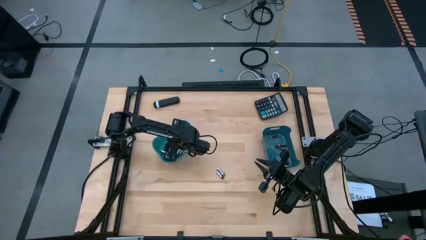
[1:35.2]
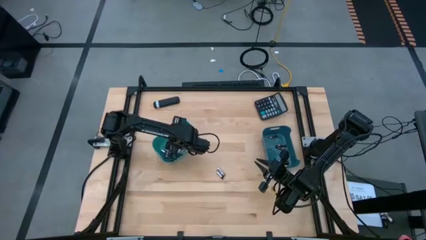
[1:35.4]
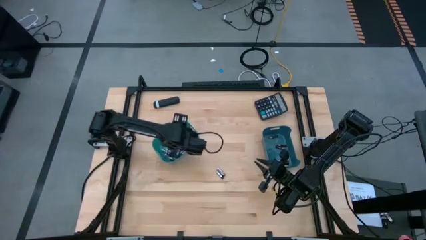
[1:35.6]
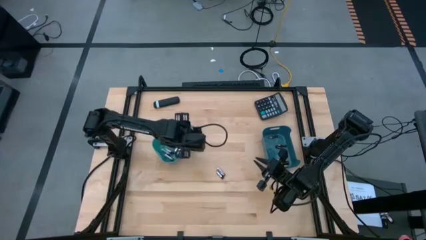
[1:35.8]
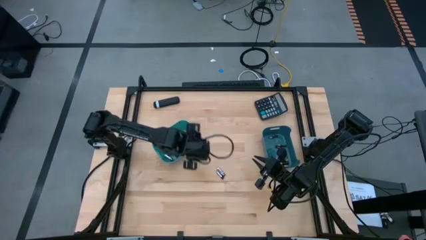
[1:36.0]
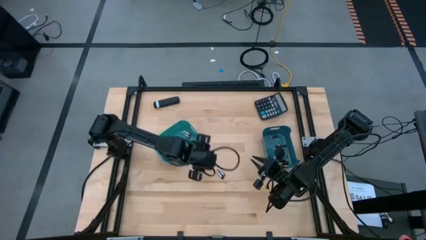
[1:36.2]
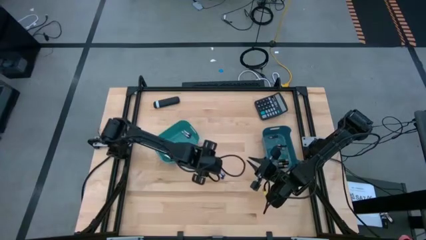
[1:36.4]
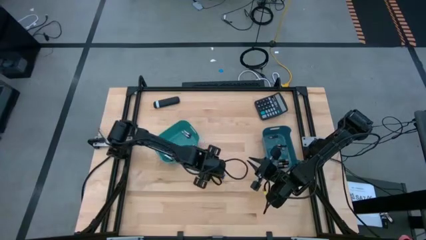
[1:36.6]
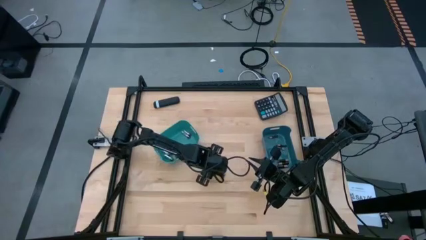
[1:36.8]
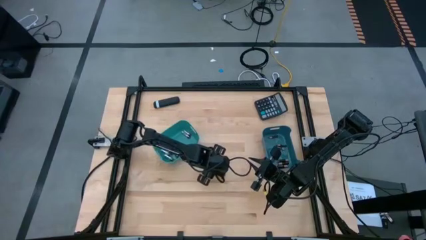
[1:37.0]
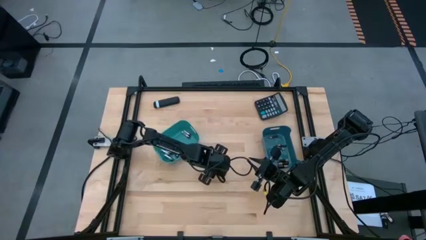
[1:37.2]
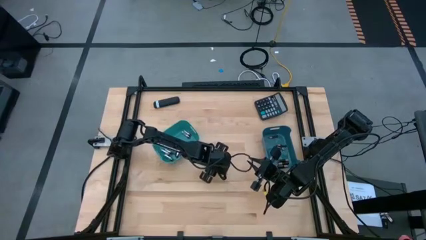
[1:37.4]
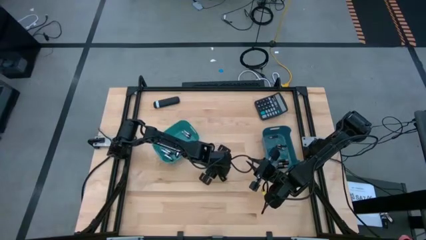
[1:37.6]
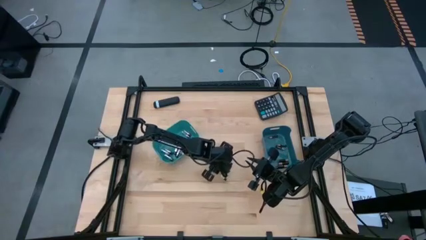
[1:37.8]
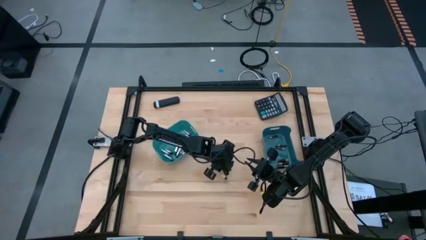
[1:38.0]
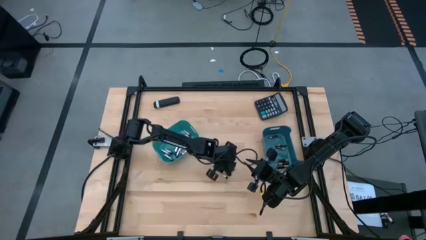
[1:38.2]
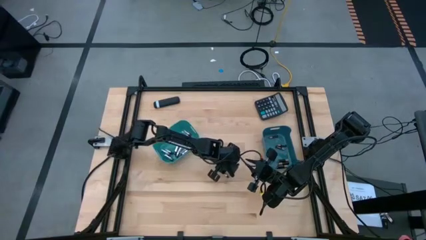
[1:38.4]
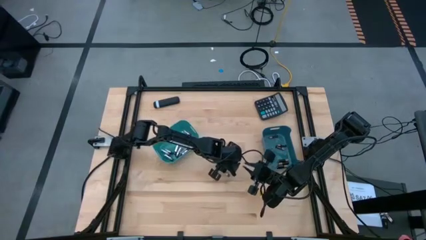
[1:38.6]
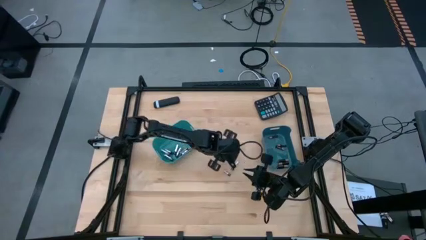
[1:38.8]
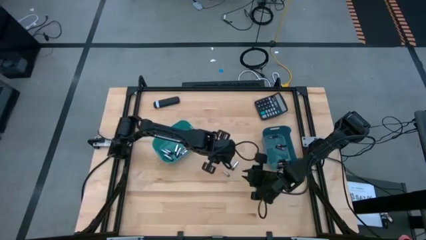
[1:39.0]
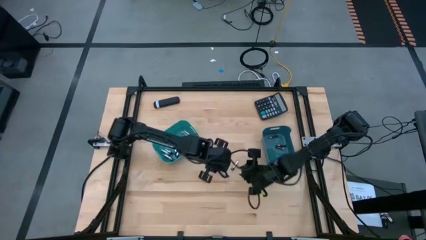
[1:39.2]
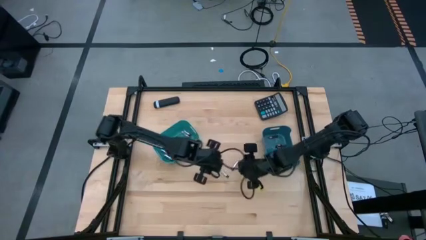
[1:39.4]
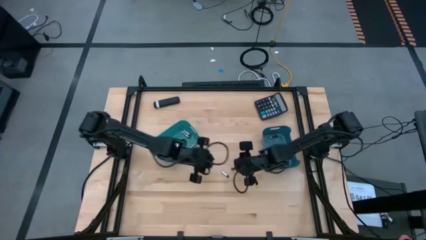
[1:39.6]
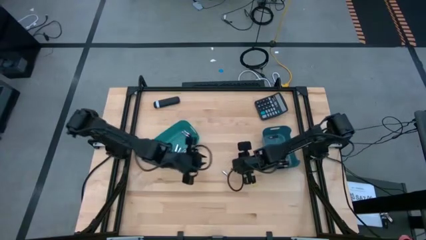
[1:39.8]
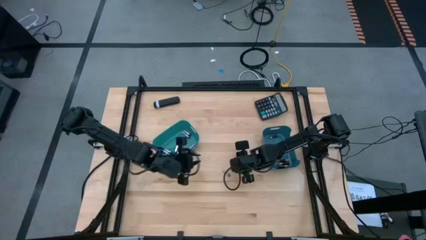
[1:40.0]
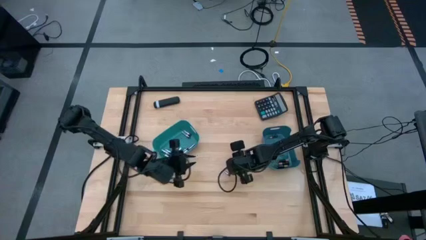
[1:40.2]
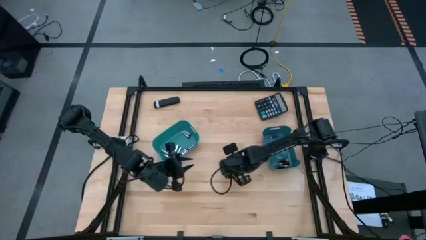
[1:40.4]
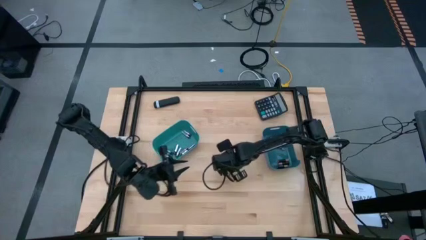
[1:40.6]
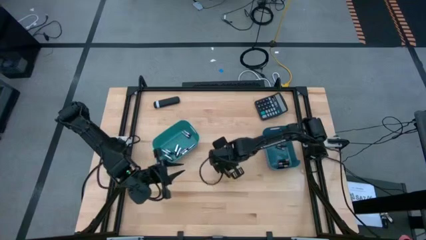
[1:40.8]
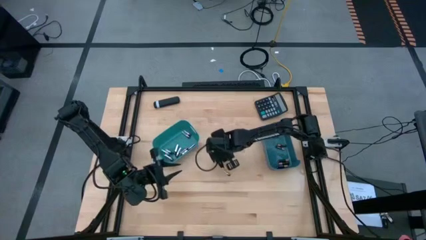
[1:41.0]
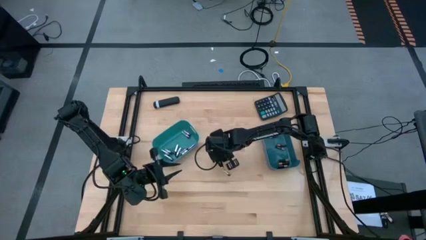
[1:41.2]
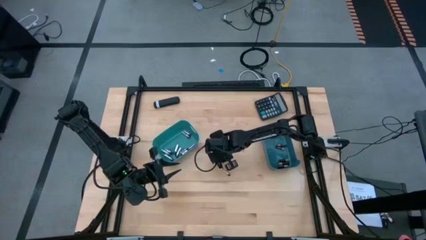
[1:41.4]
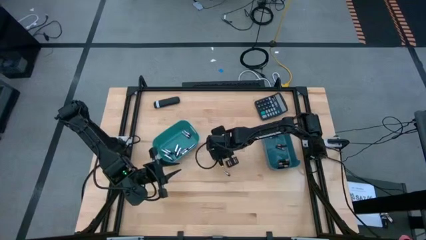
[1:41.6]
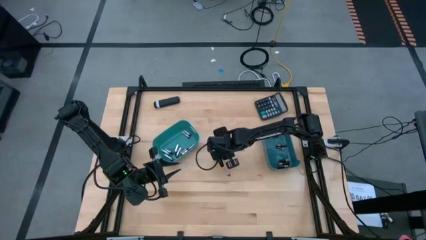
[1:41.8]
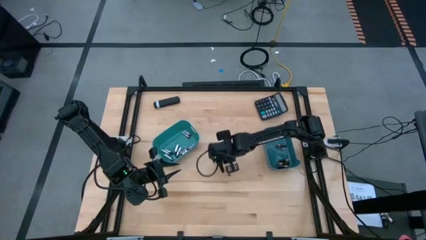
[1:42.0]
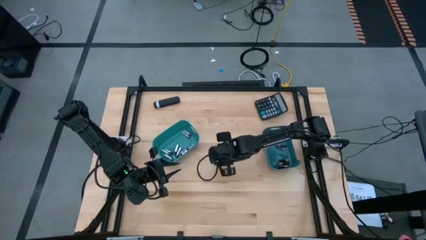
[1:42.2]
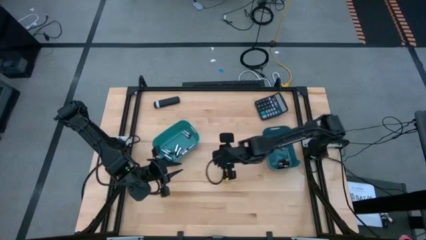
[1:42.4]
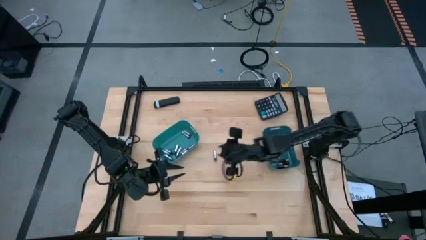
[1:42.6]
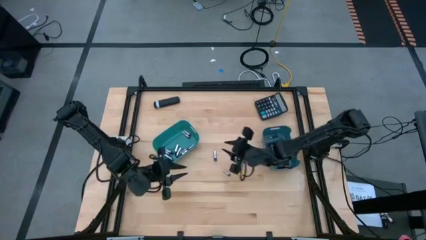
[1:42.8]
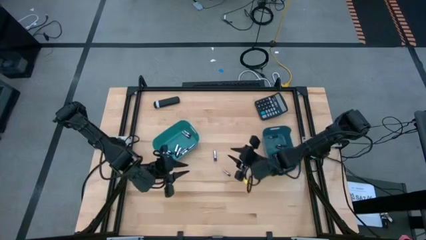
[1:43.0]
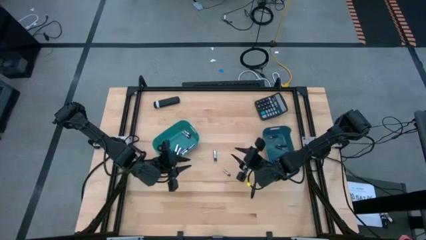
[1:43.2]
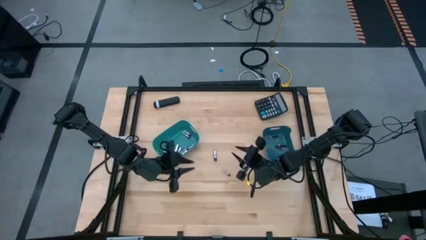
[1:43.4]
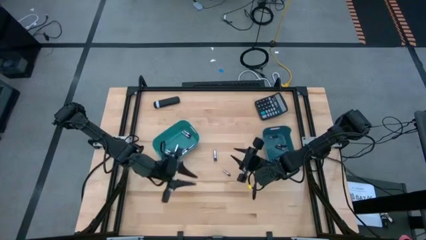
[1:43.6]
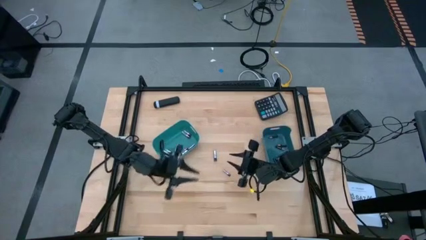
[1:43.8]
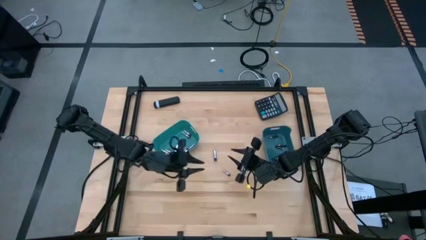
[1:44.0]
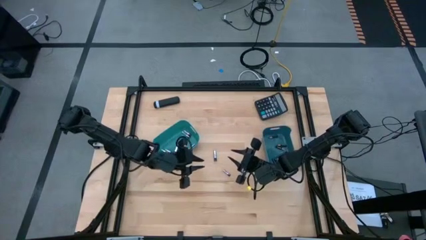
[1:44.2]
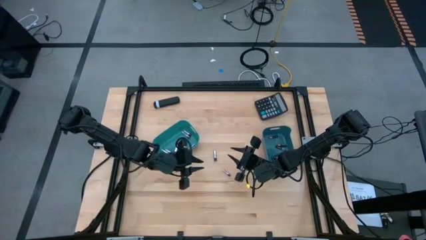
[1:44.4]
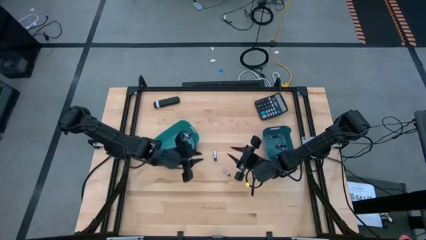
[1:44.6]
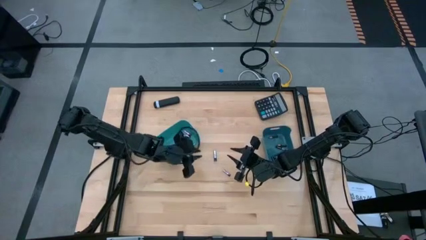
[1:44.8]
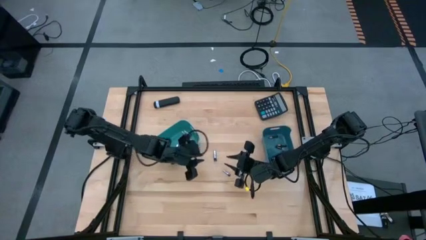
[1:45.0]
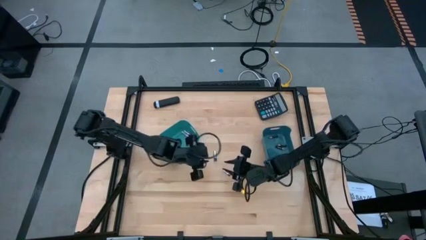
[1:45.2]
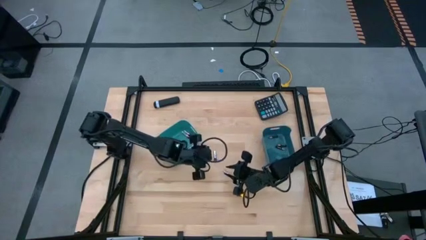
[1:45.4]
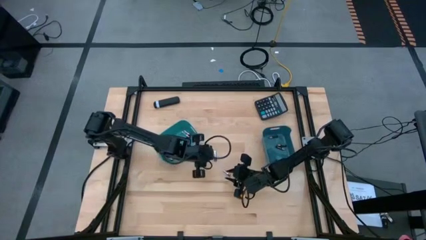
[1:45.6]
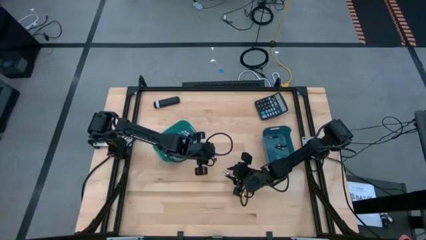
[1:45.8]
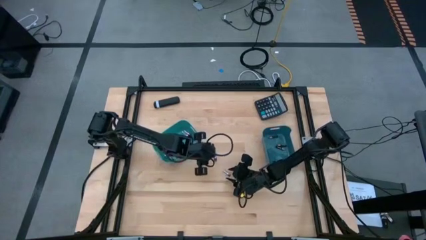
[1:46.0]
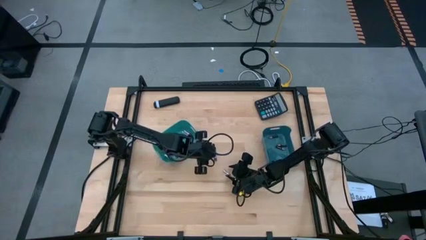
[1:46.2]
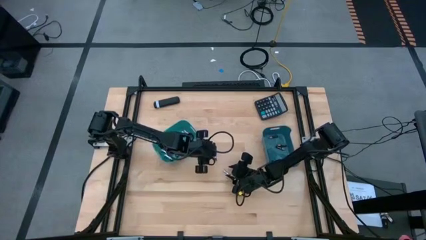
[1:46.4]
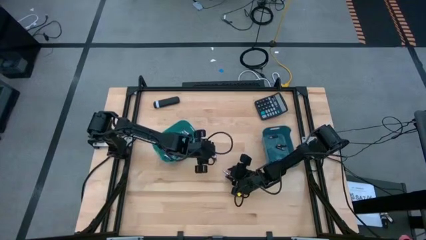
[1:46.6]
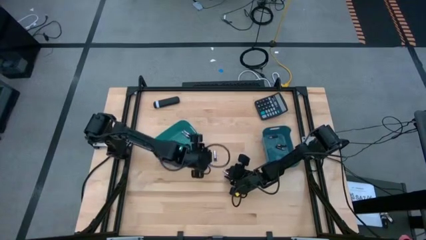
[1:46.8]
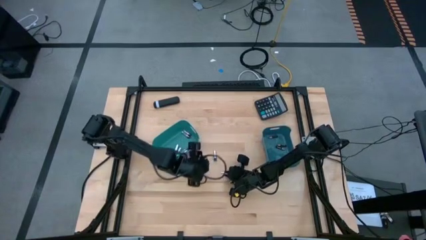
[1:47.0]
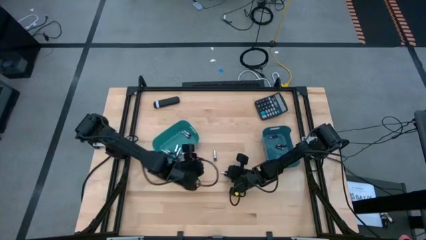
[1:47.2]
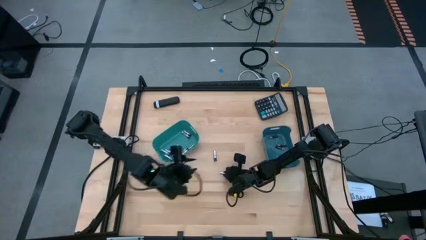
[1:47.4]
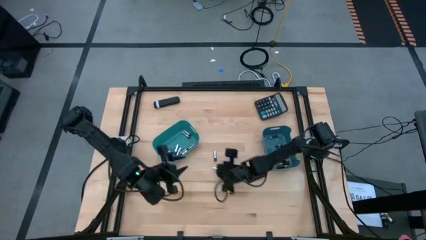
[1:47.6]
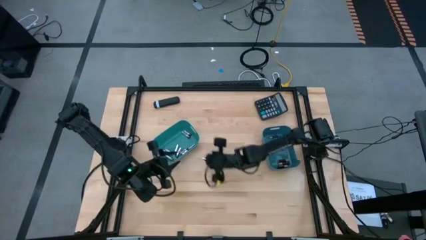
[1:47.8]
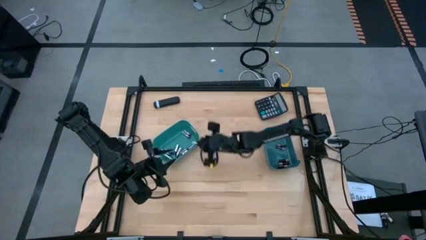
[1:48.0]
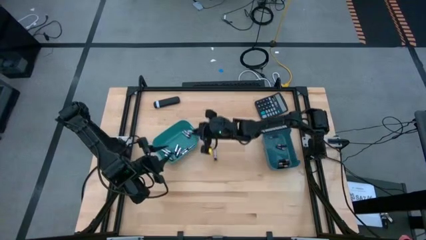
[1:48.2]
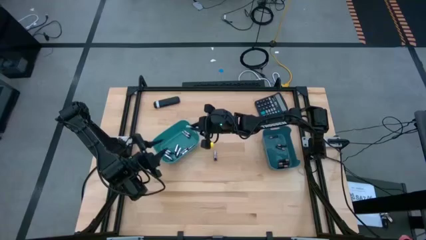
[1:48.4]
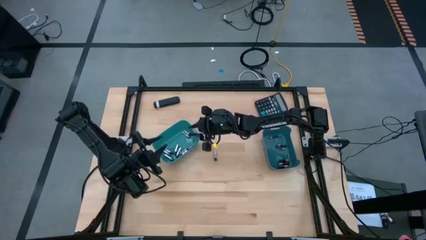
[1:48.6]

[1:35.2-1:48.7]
Task: Sort batteries
Put the white battery into the green bin
